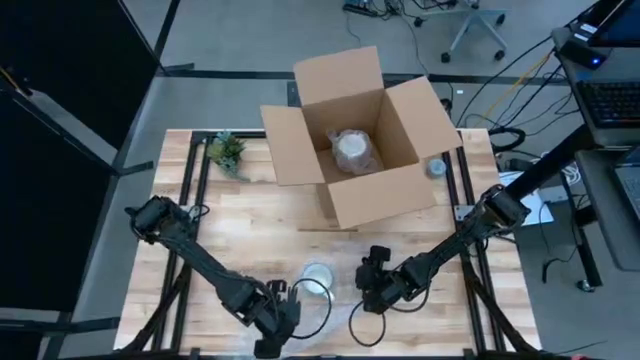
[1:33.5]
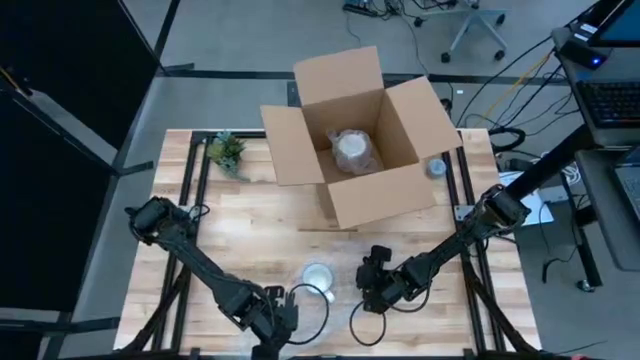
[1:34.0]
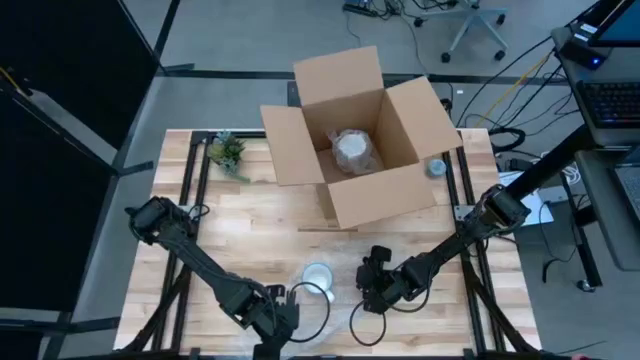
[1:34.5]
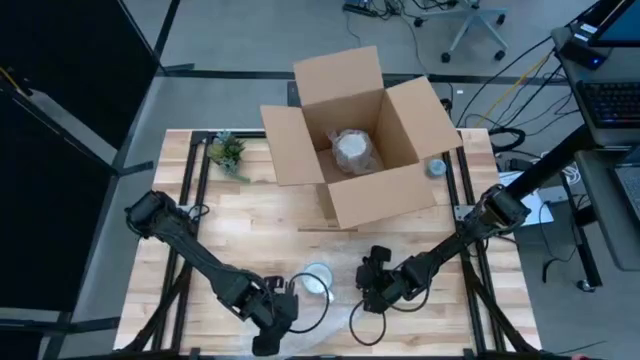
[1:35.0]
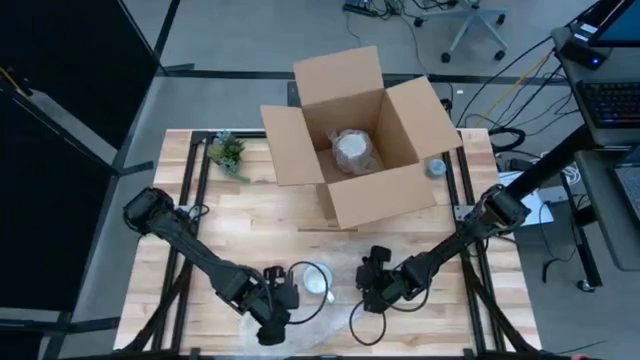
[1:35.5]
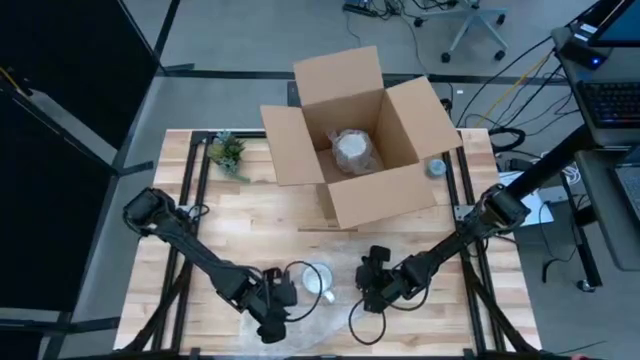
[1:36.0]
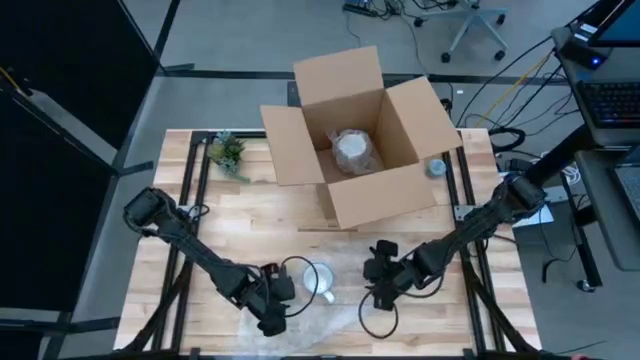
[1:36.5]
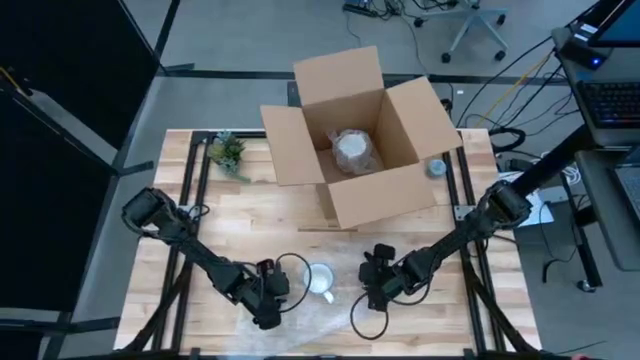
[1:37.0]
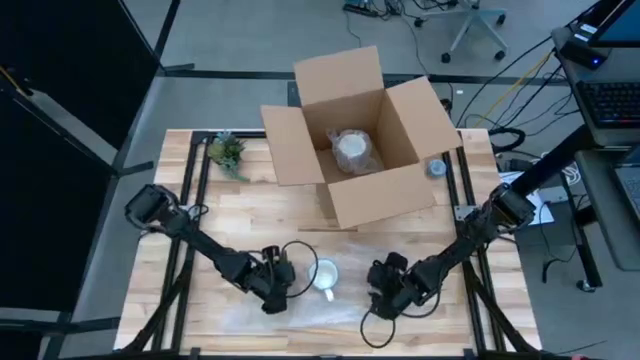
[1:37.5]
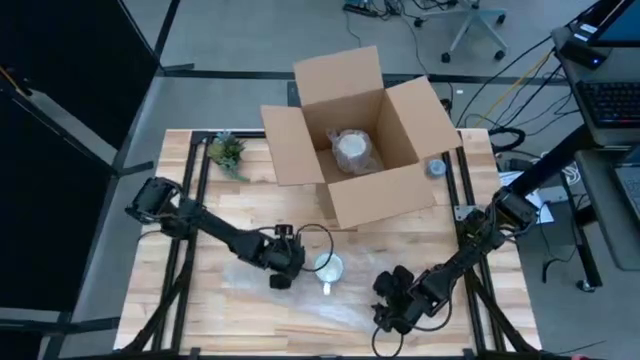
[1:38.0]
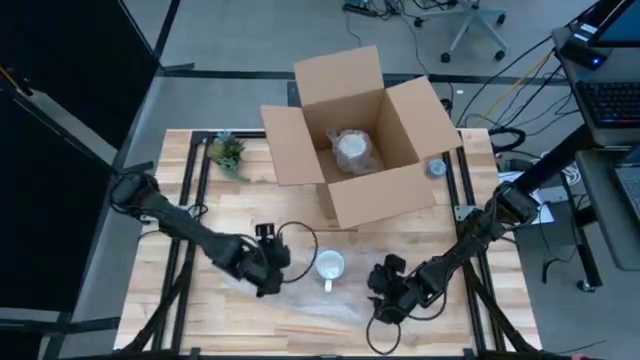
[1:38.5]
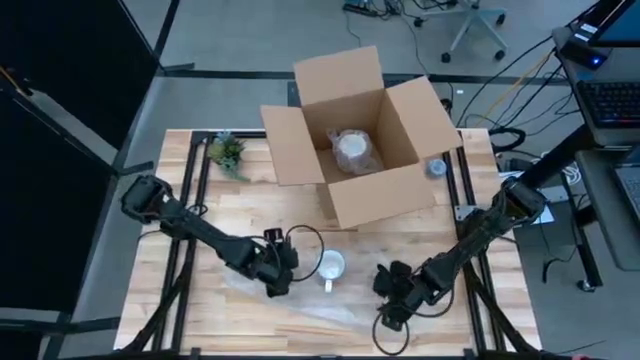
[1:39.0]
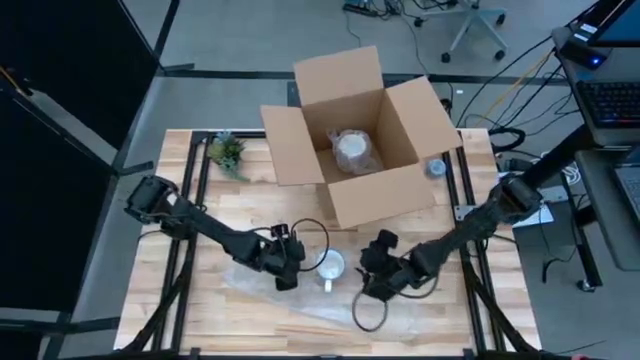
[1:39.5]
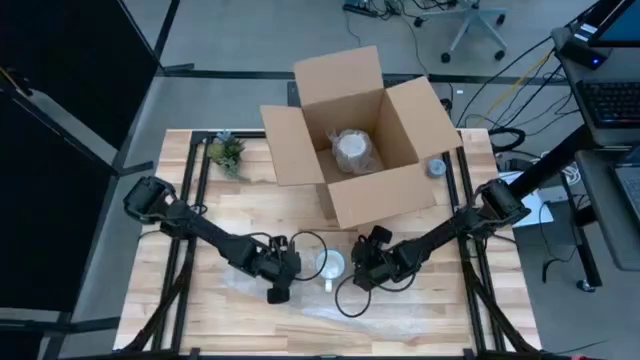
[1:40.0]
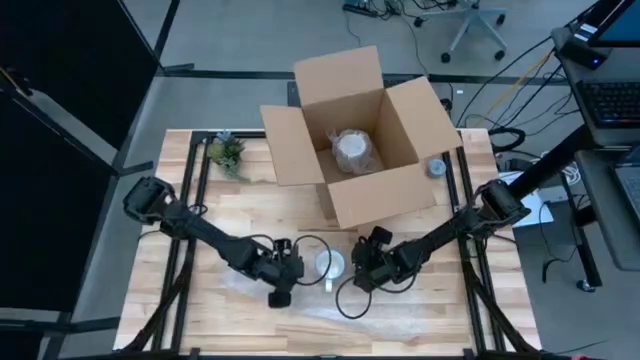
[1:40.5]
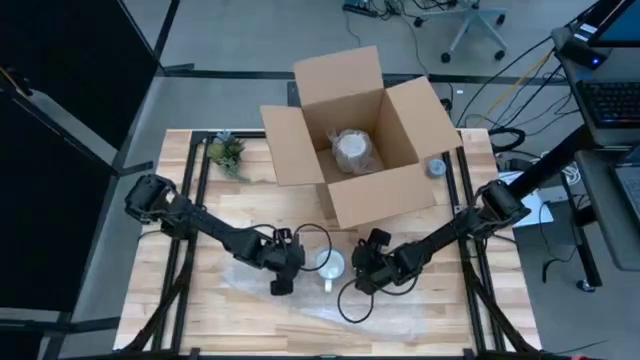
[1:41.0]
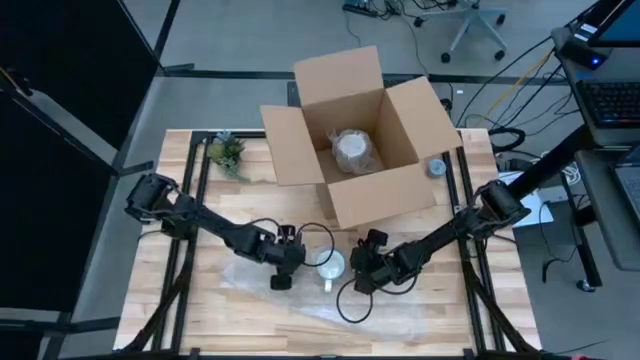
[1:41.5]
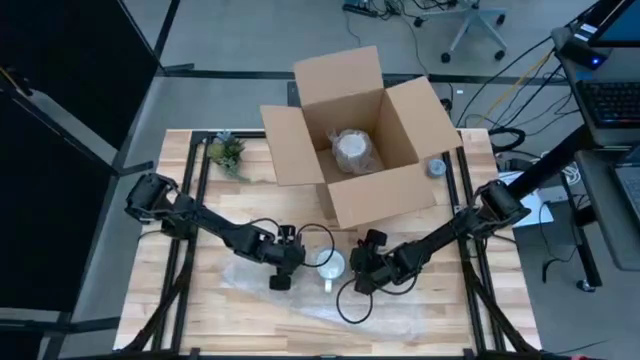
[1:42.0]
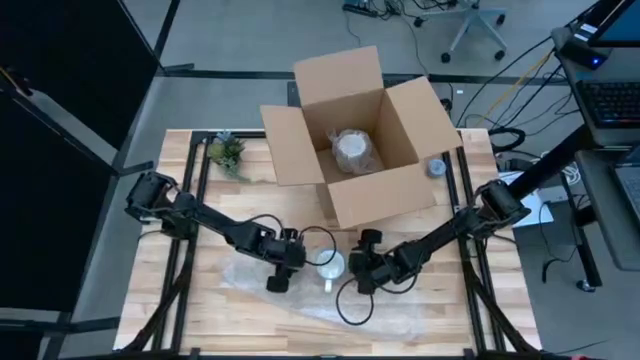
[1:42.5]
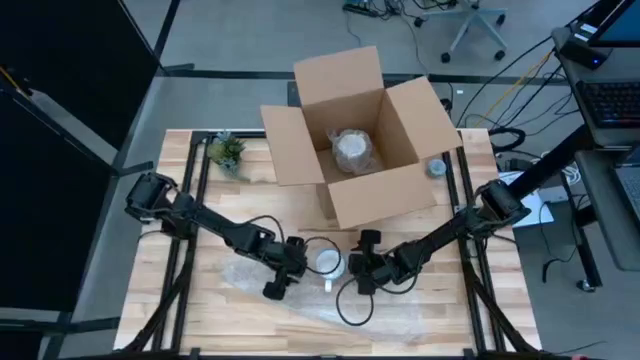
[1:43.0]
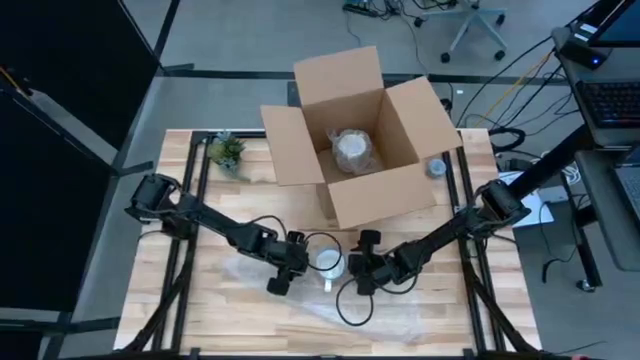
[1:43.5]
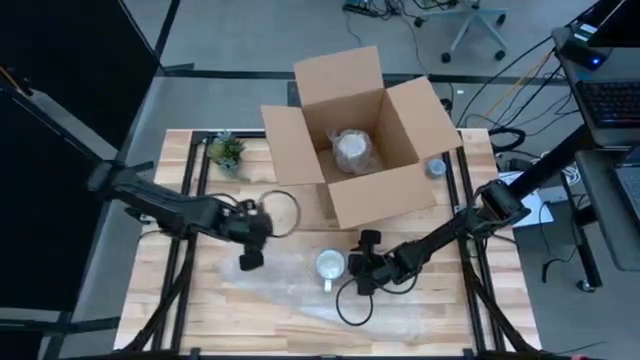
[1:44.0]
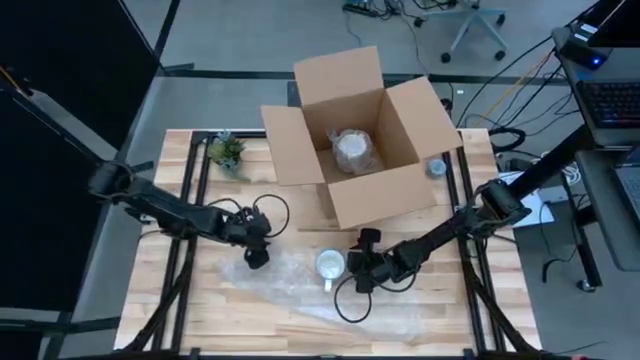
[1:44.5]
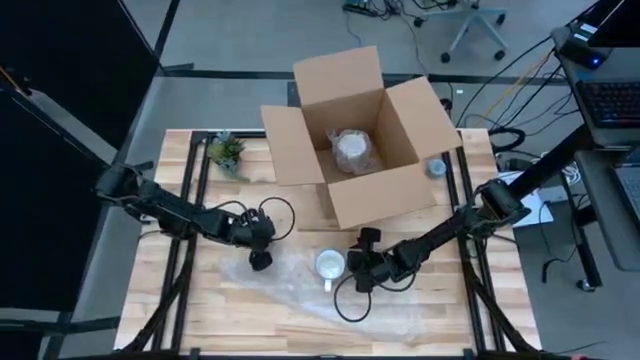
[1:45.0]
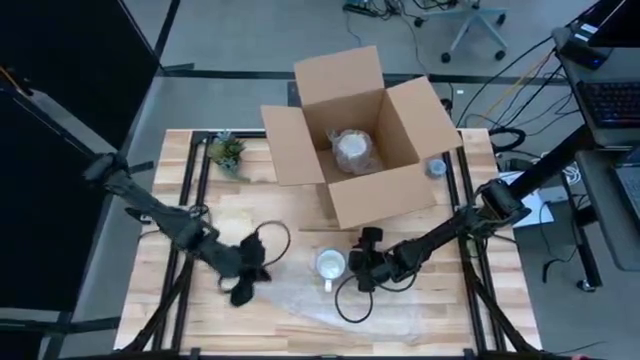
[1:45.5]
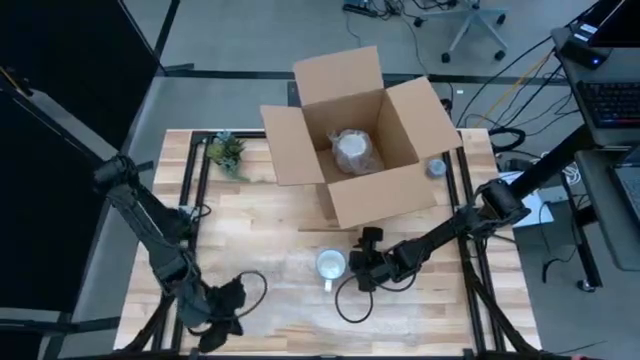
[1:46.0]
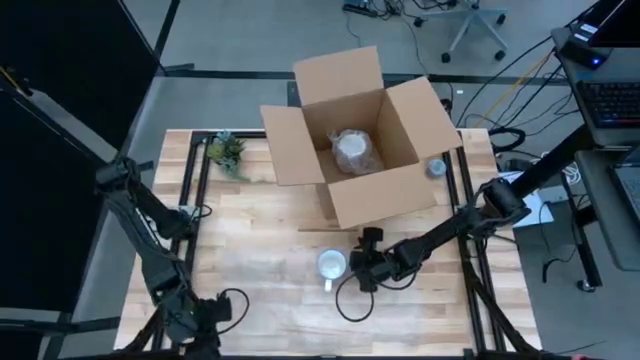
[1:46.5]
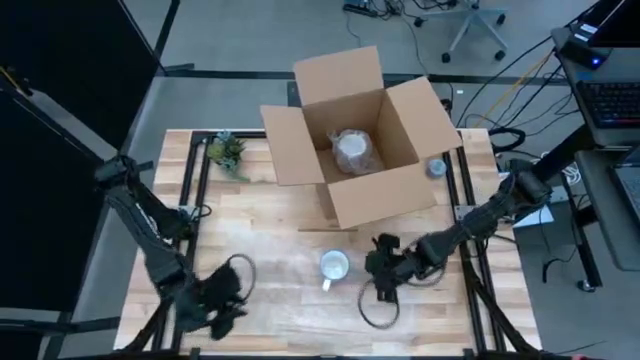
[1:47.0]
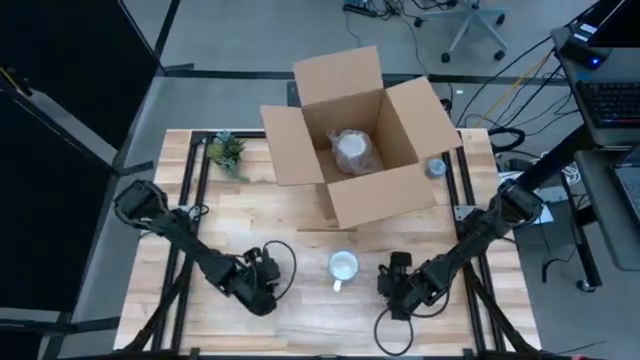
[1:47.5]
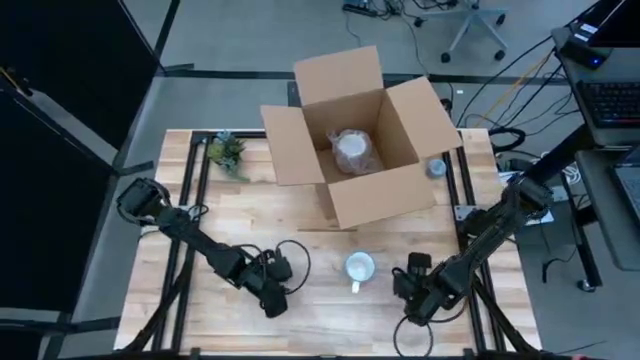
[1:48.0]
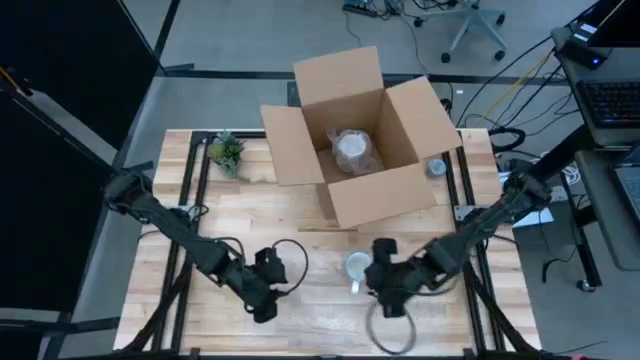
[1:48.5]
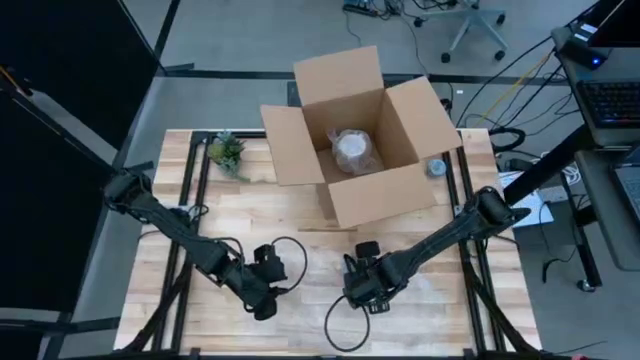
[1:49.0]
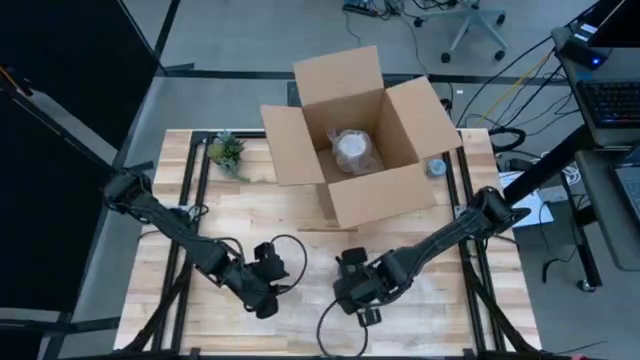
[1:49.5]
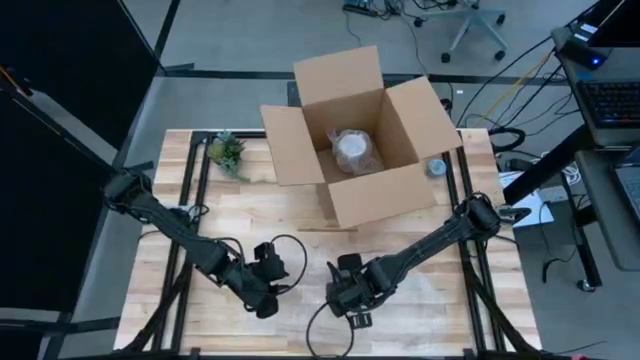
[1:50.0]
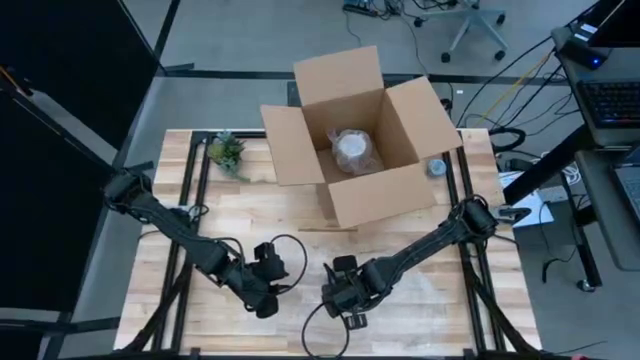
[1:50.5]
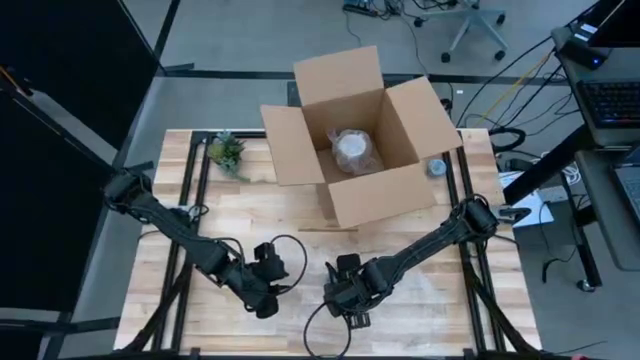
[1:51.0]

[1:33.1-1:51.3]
Task: wrap mug
Wrap the red mug with the bubble wrap

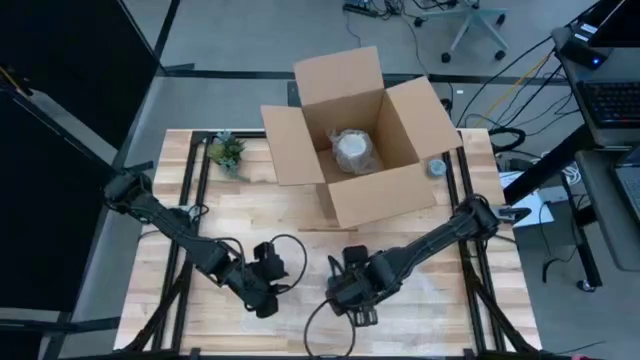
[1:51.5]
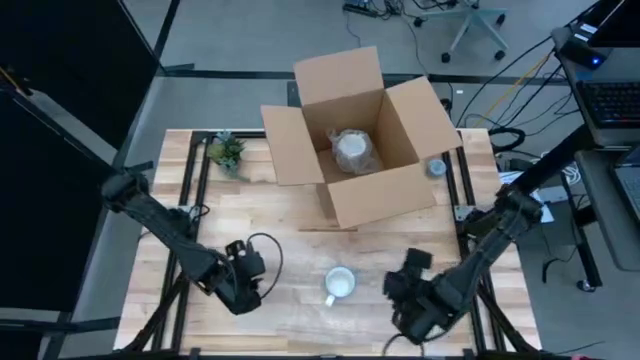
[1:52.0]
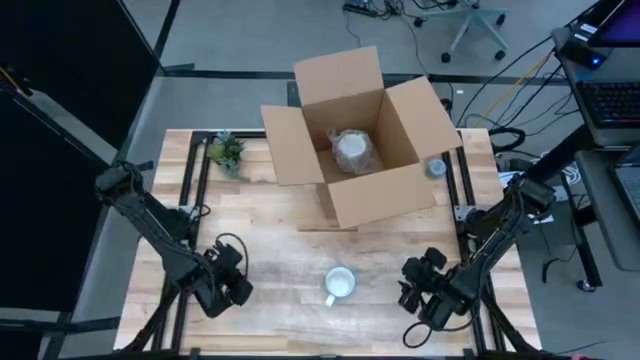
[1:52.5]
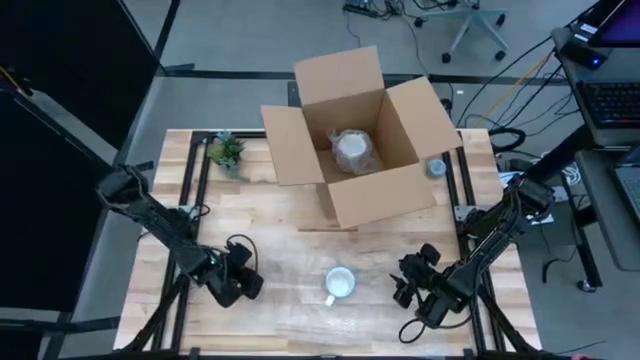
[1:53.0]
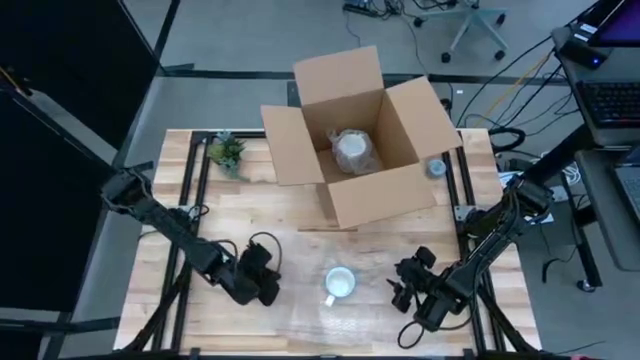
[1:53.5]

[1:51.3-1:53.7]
Wrap the red mug with the bubble wrap

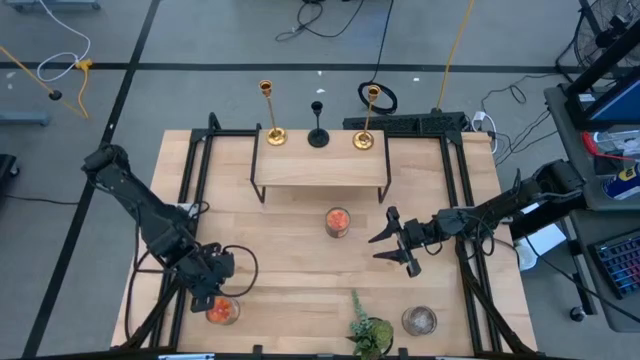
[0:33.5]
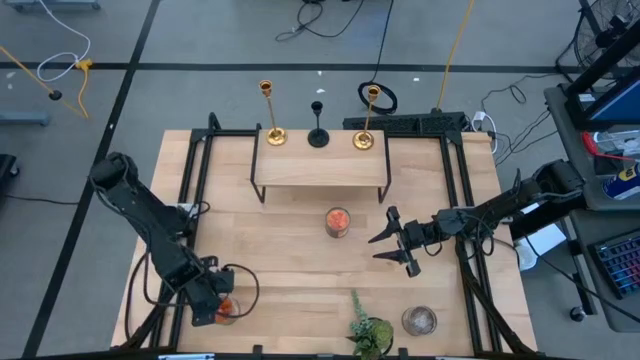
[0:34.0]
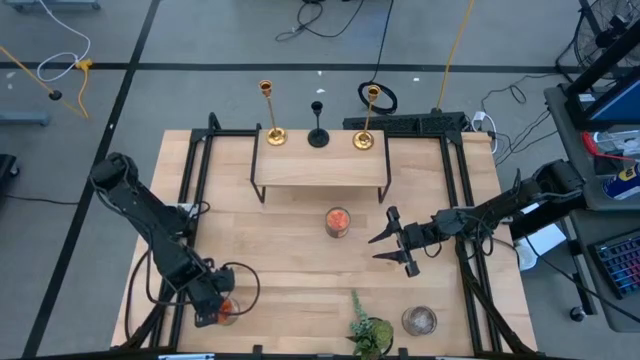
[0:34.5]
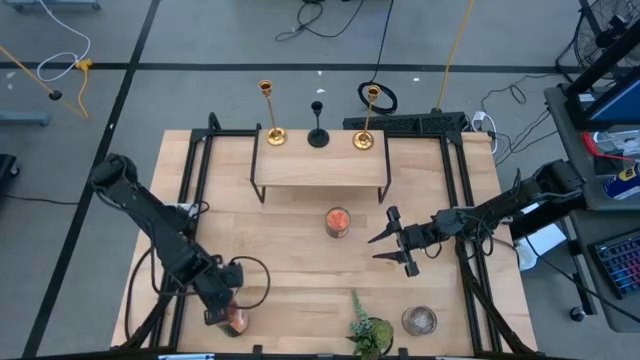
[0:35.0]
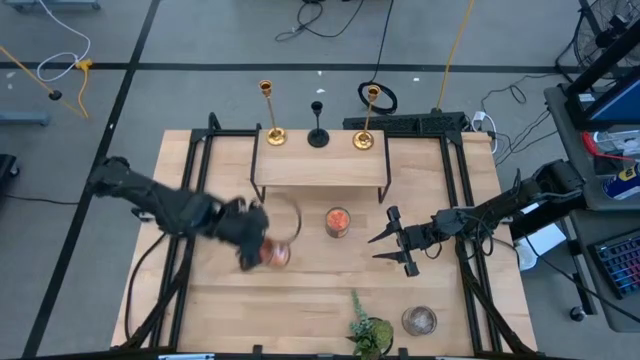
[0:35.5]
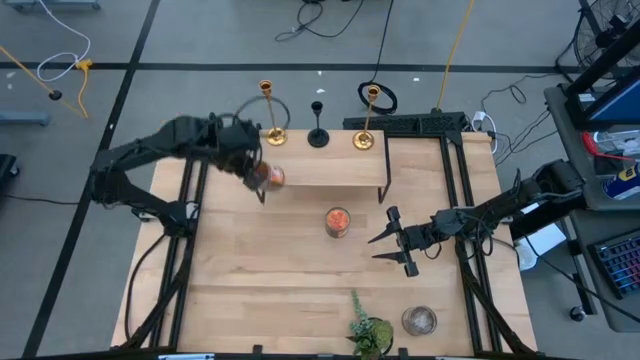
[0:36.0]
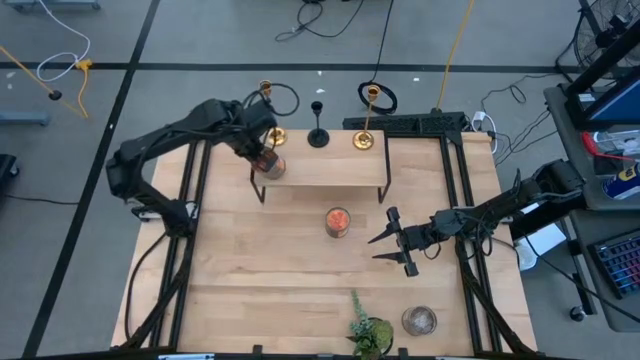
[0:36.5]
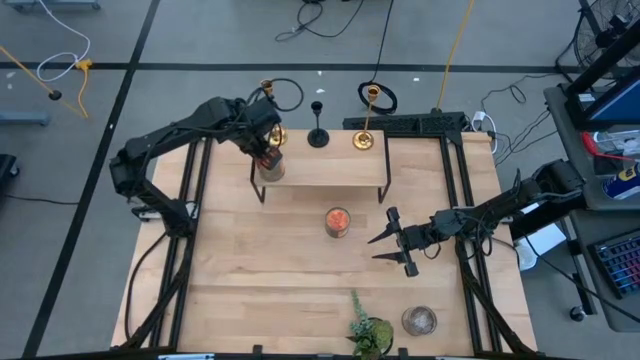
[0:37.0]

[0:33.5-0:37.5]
Task: Pick & Place candle stick holders
Put the bottom orange scented candle on the shelf
